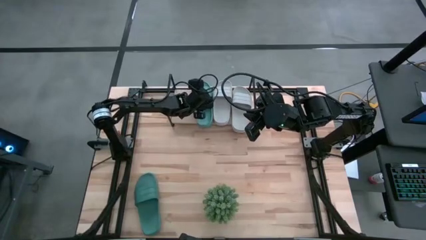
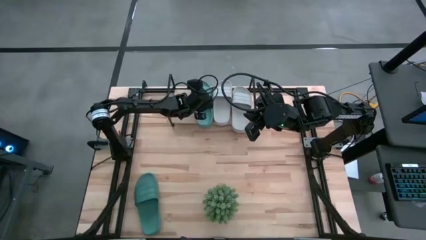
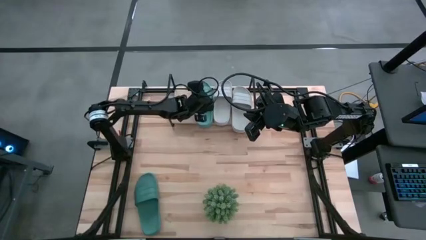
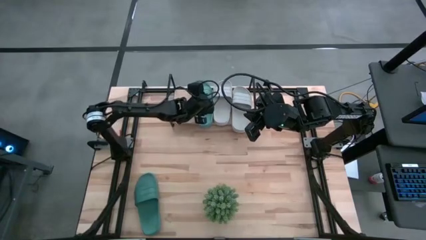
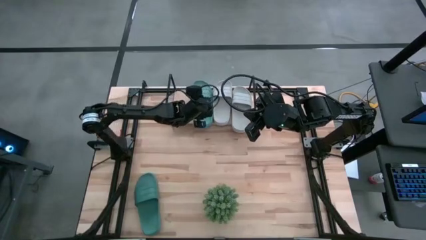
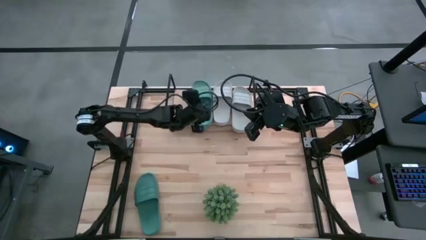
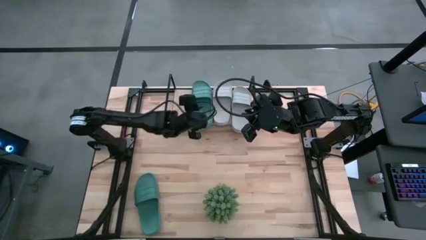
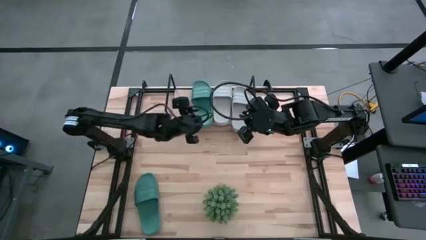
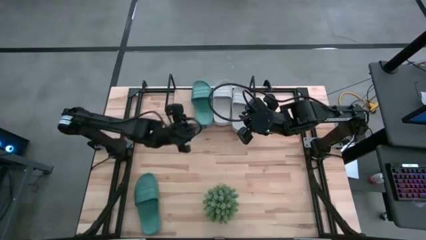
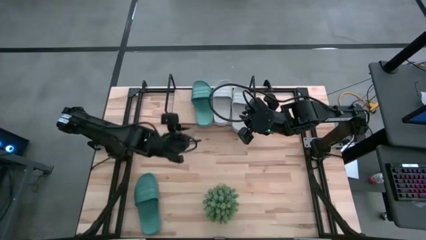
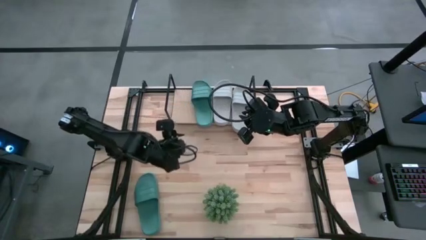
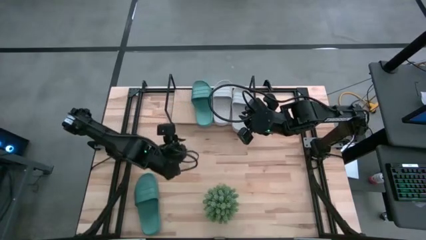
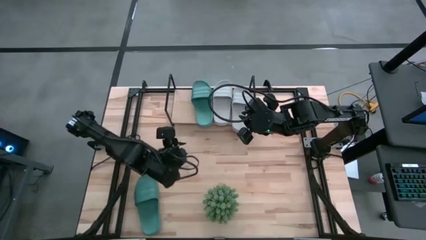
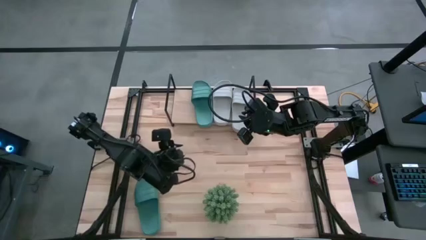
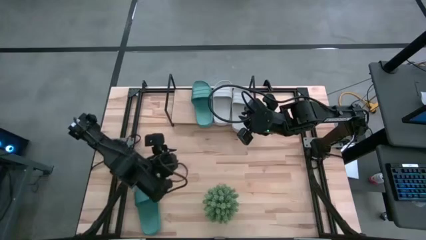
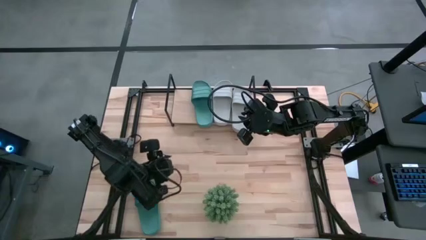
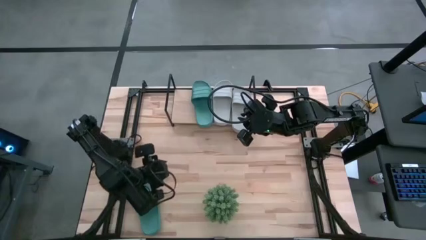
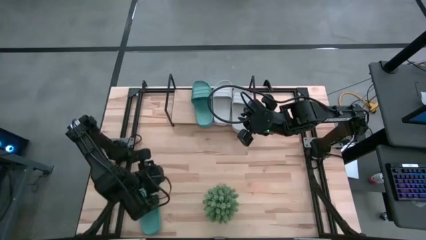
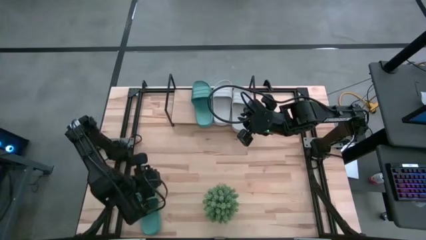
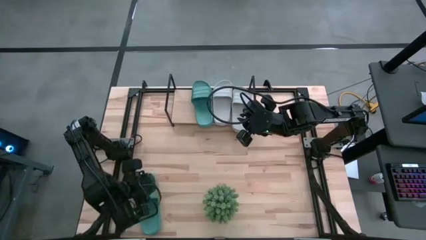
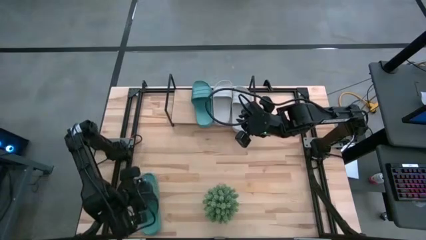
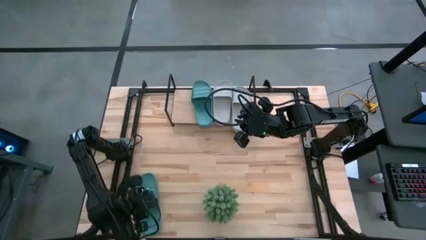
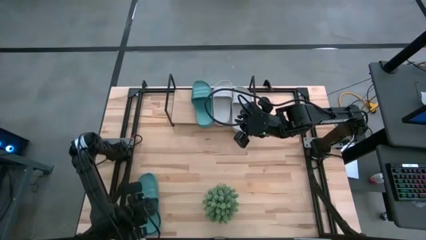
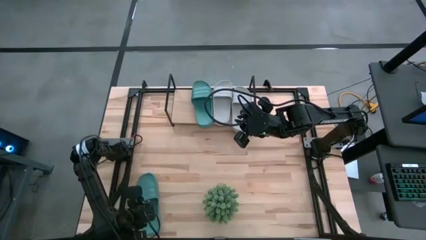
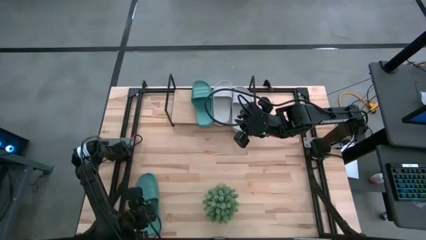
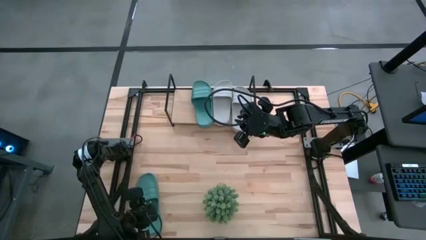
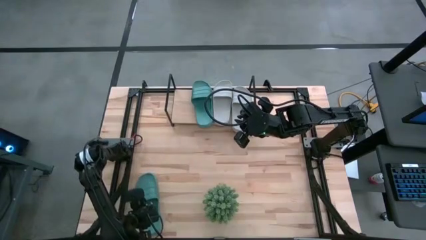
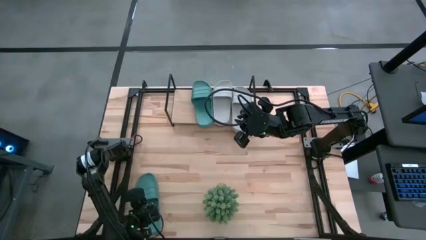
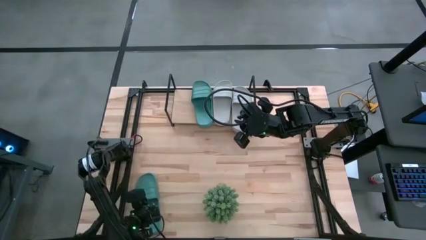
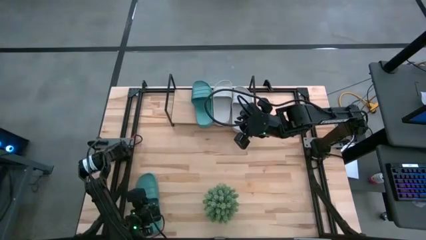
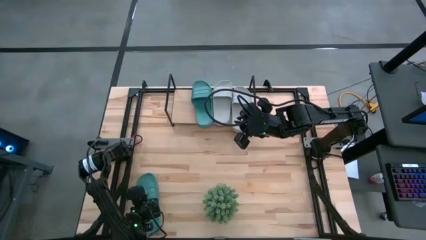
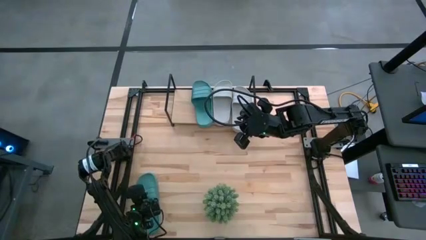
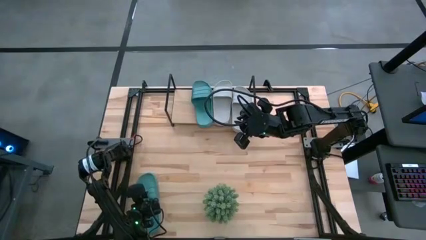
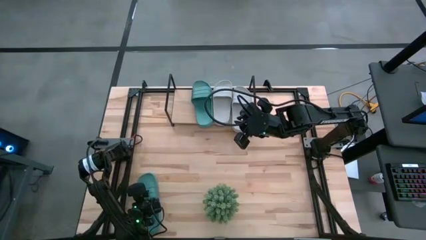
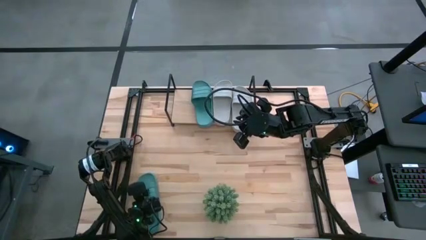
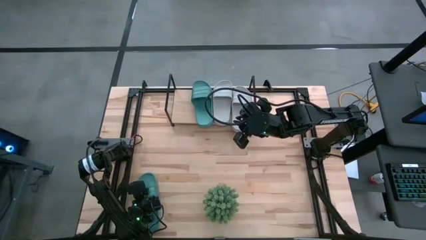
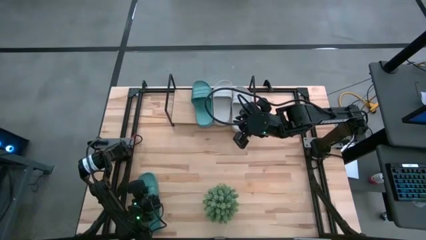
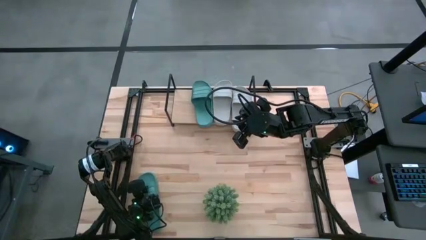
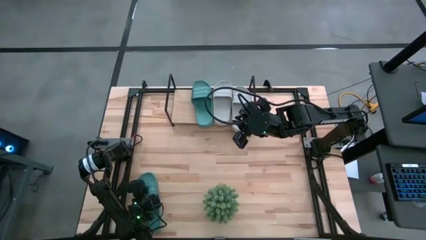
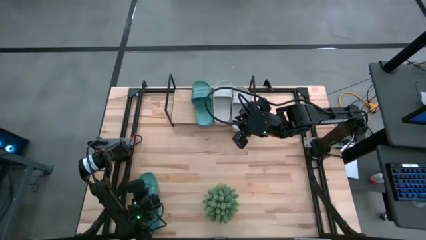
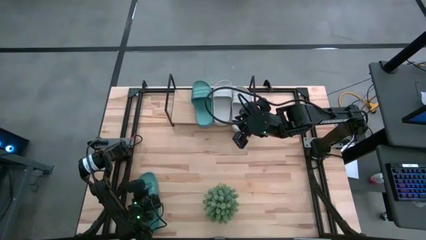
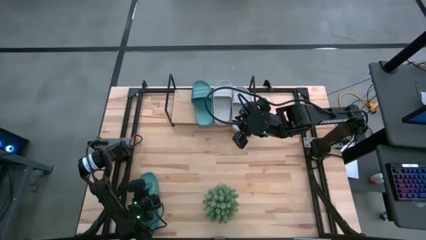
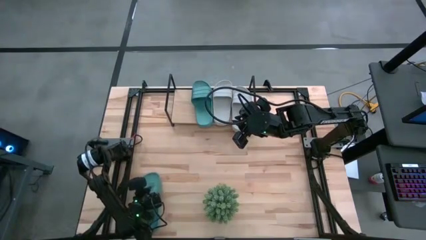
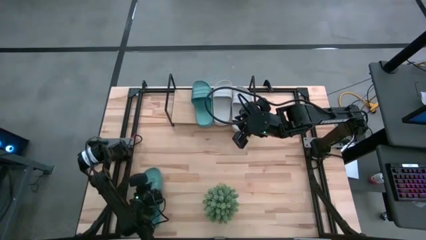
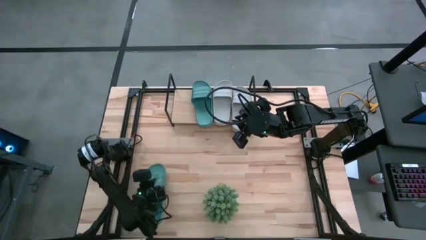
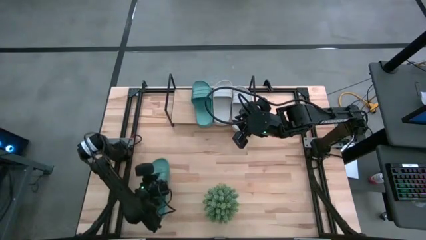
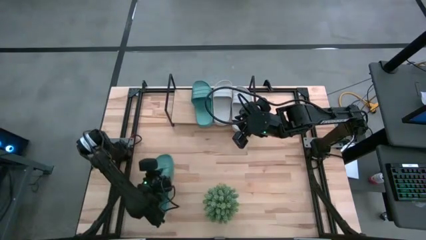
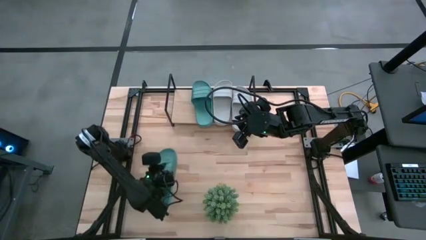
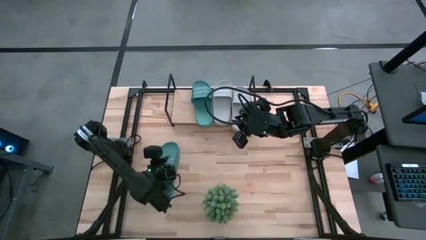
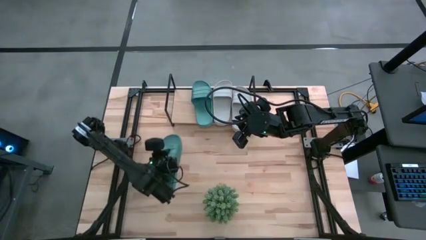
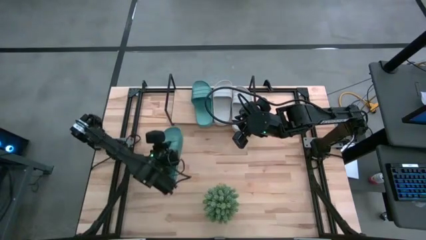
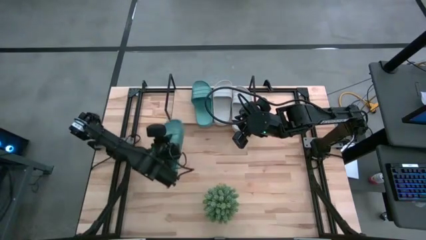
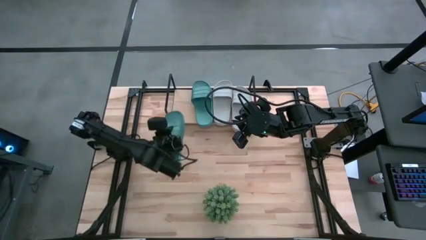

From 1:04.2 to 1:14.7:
Task: Pick and place slides into the shelf
Put the green slipper on the shelf

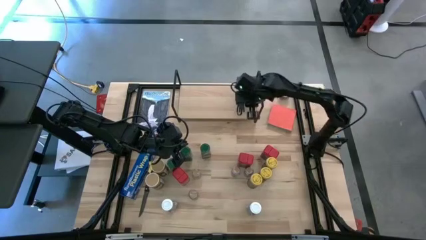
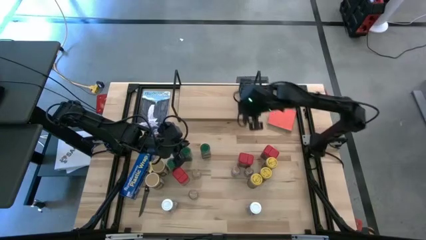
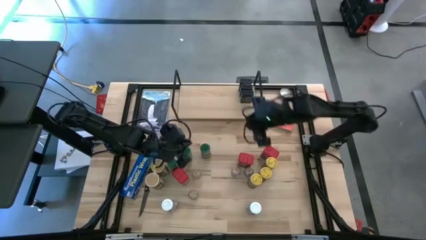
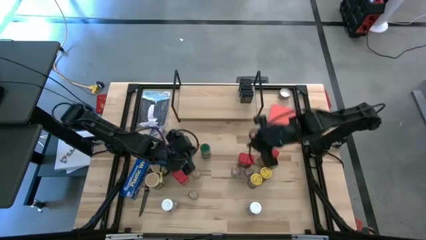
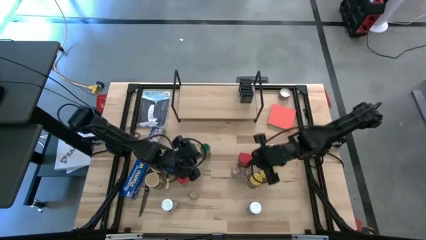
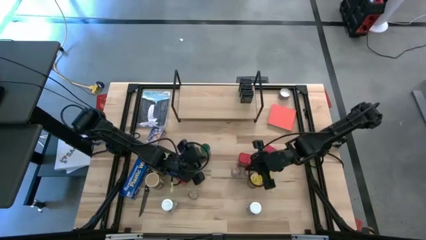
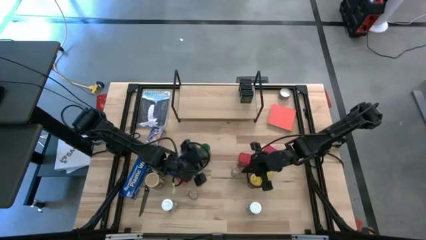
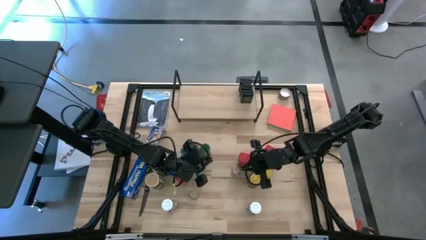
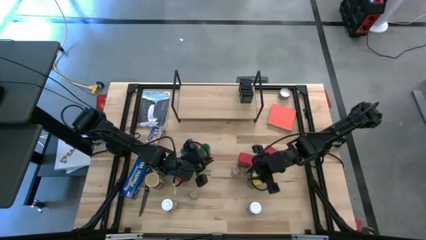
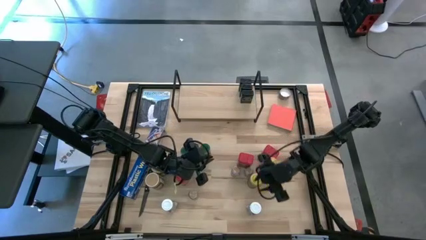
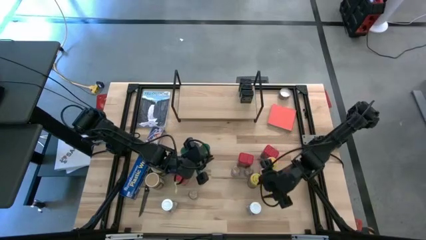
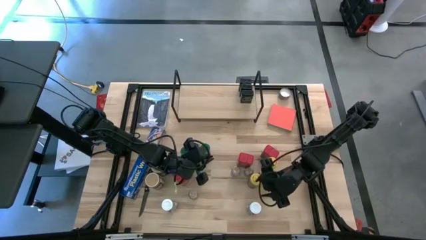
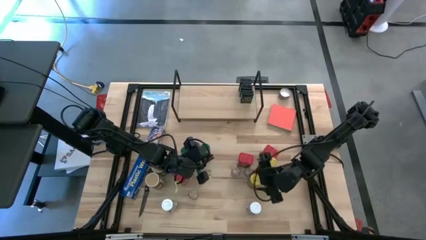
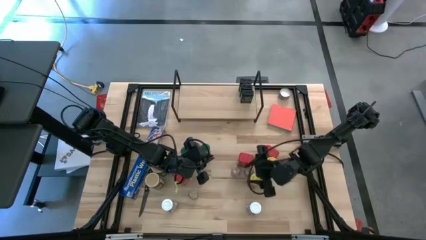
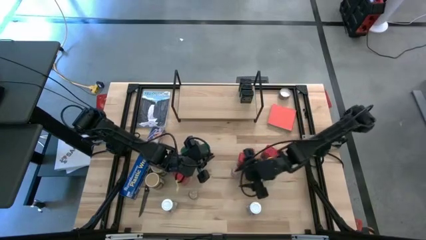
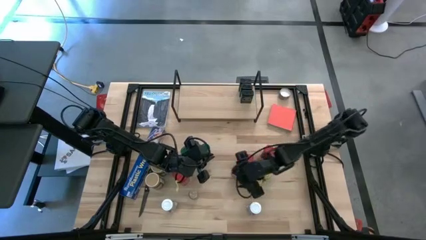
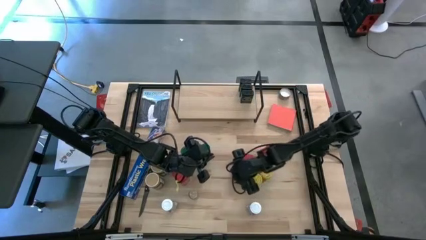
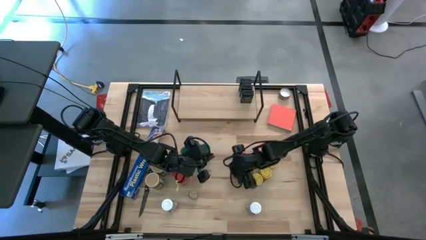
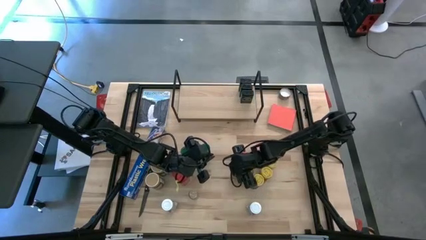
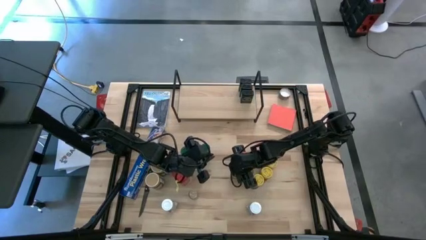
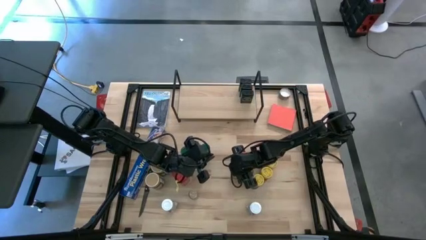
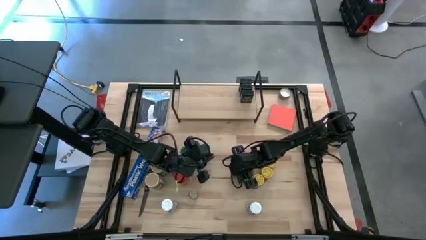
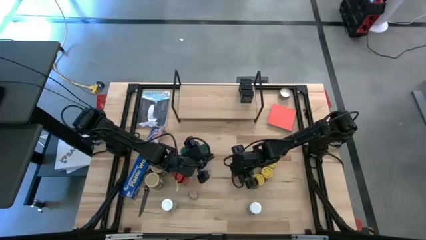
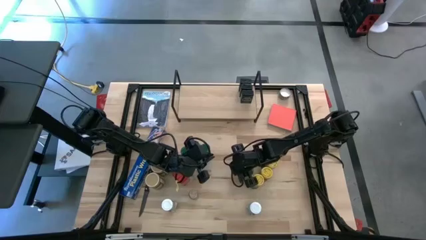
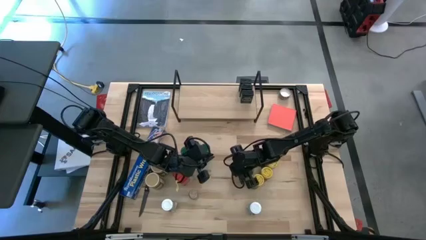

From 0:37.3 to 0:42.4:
Task: Shelf spices
Put the transparent seasoning bottle on the shelf
